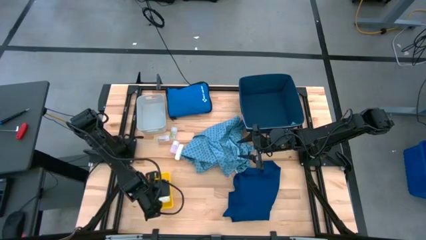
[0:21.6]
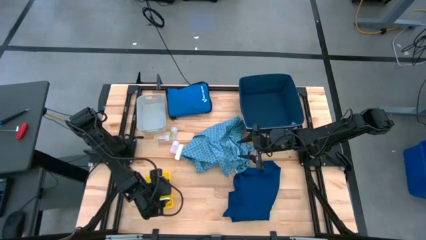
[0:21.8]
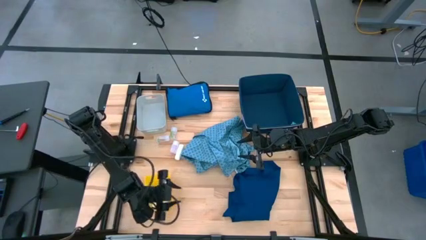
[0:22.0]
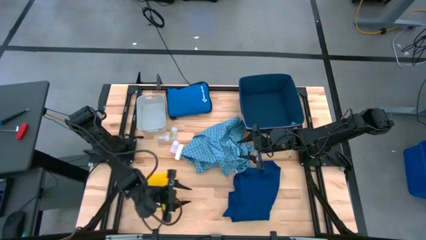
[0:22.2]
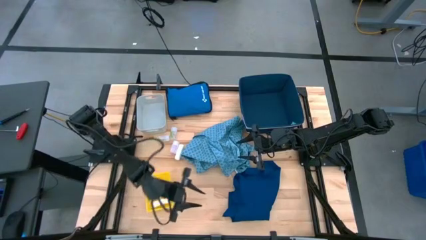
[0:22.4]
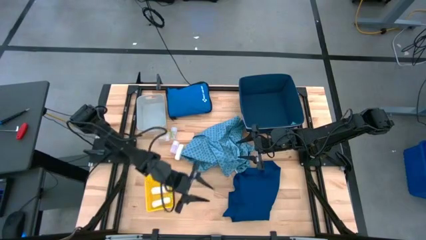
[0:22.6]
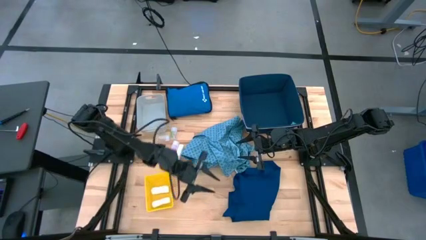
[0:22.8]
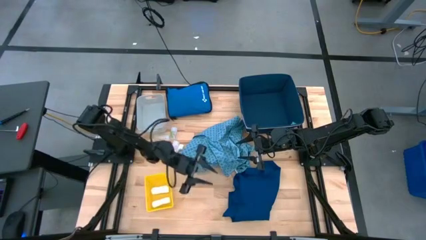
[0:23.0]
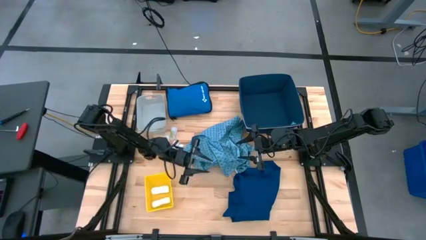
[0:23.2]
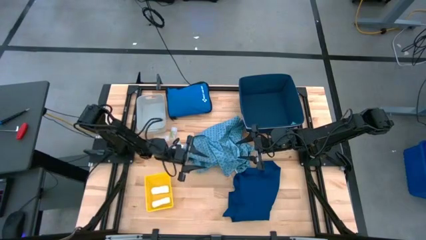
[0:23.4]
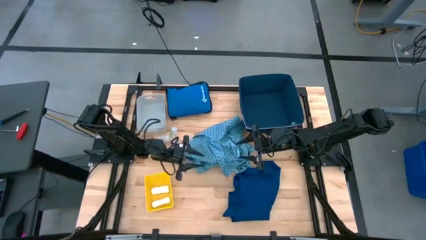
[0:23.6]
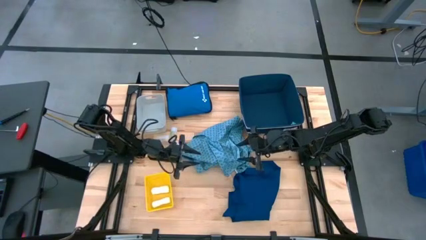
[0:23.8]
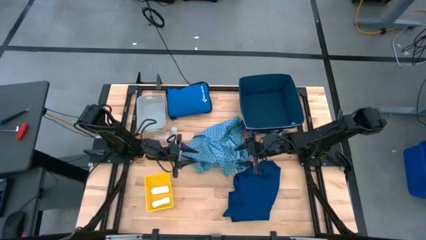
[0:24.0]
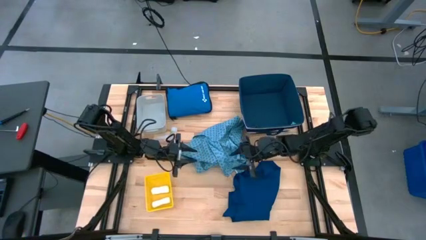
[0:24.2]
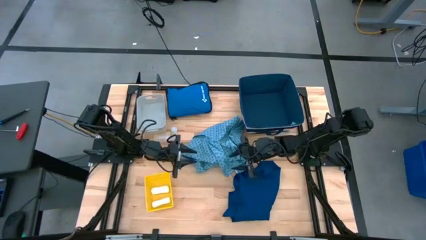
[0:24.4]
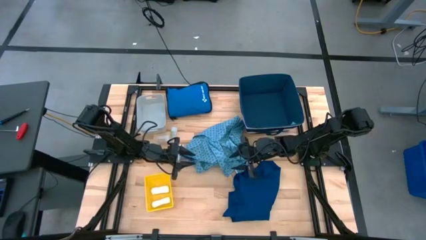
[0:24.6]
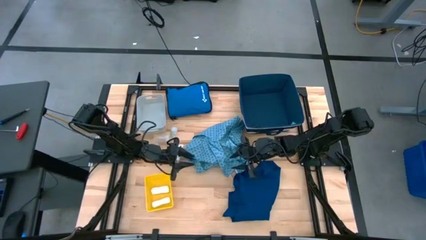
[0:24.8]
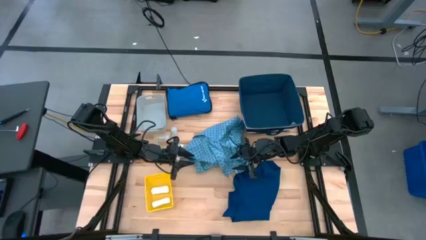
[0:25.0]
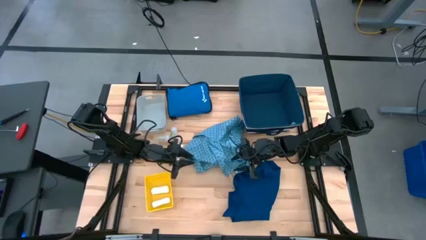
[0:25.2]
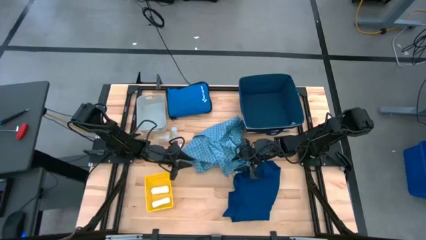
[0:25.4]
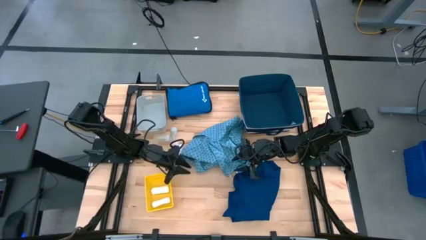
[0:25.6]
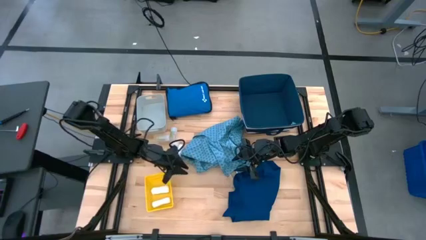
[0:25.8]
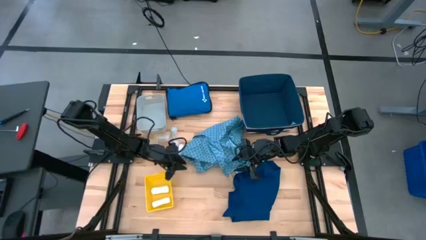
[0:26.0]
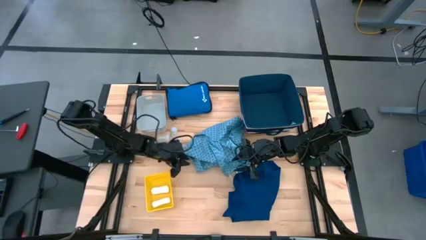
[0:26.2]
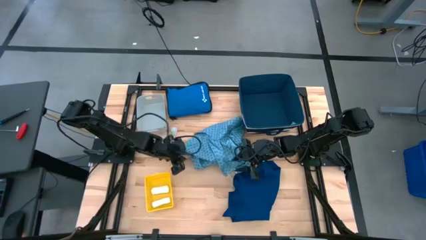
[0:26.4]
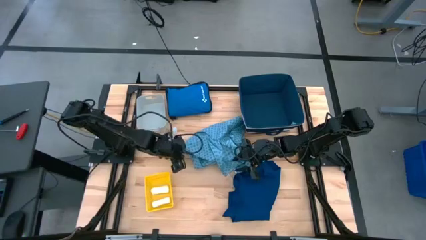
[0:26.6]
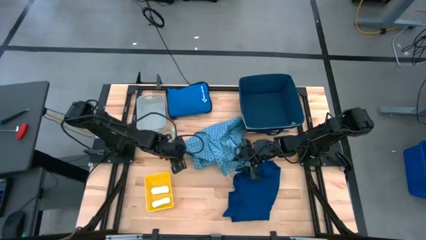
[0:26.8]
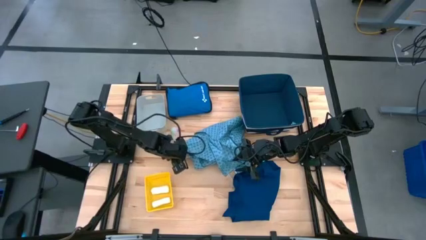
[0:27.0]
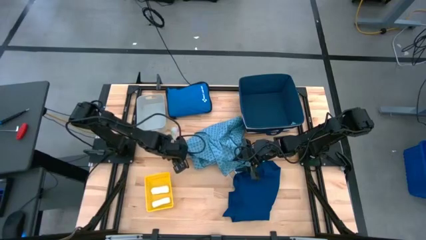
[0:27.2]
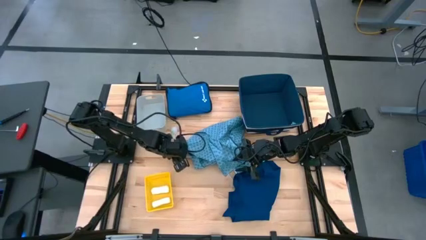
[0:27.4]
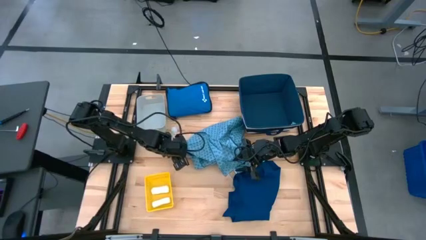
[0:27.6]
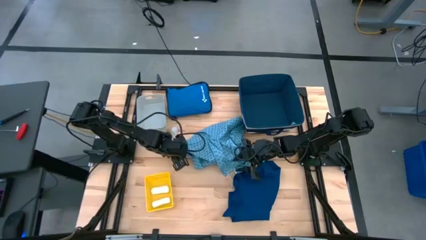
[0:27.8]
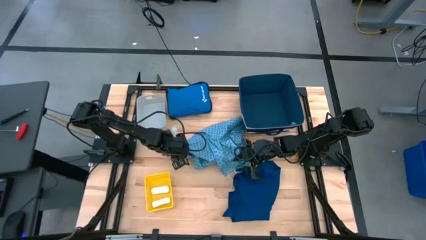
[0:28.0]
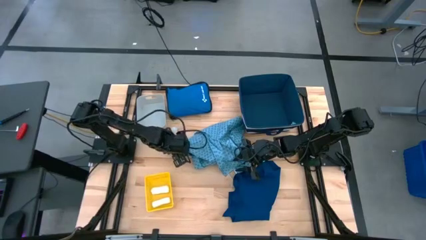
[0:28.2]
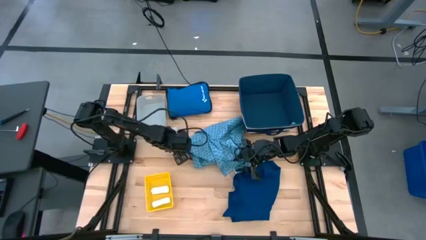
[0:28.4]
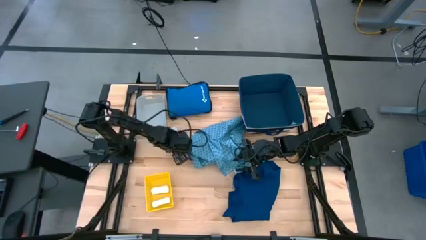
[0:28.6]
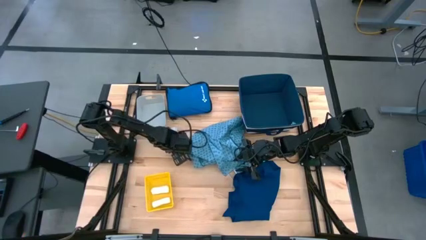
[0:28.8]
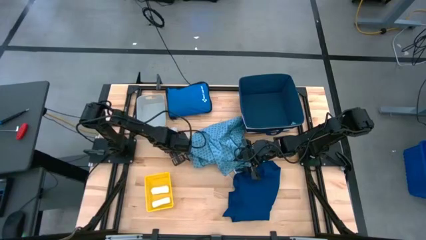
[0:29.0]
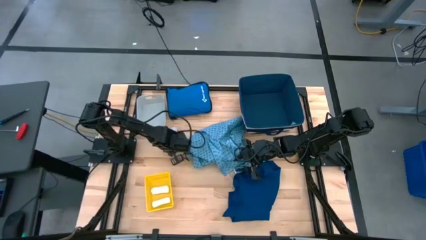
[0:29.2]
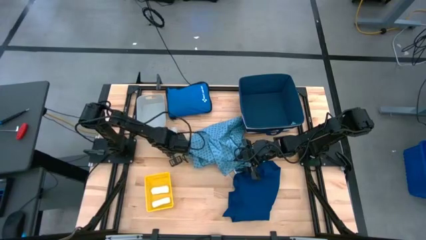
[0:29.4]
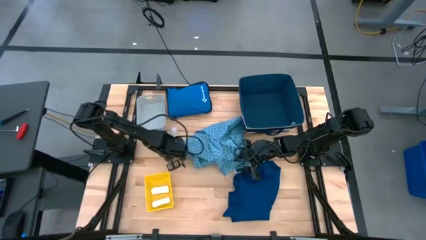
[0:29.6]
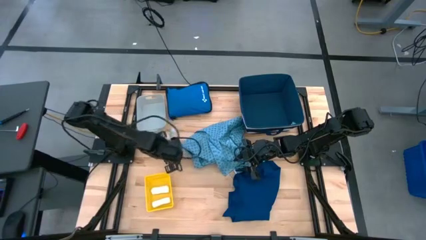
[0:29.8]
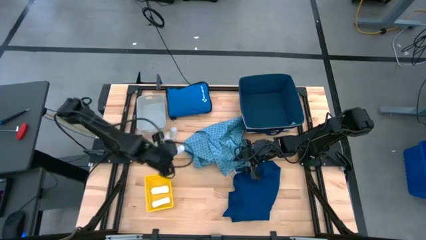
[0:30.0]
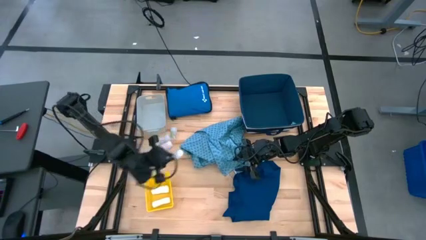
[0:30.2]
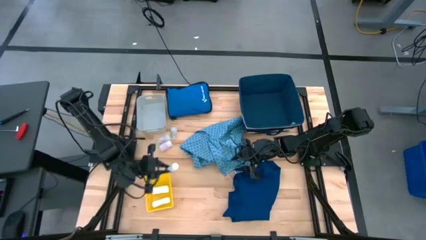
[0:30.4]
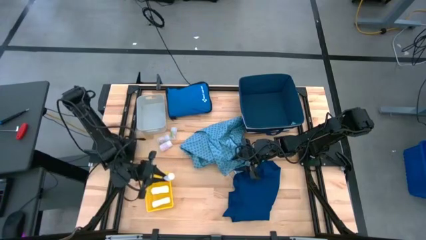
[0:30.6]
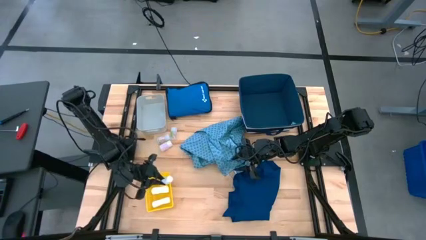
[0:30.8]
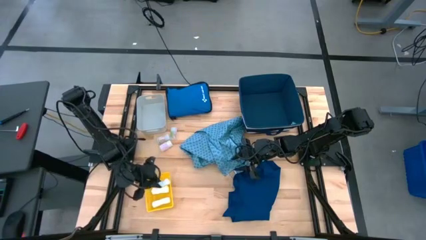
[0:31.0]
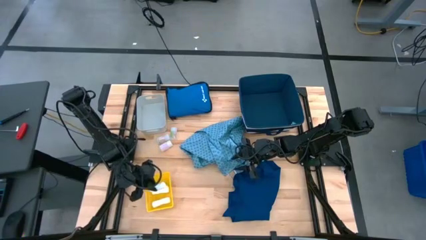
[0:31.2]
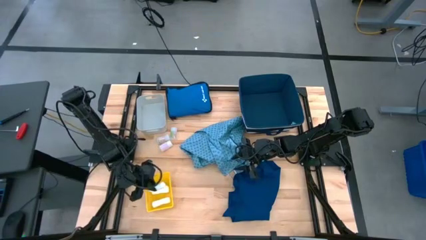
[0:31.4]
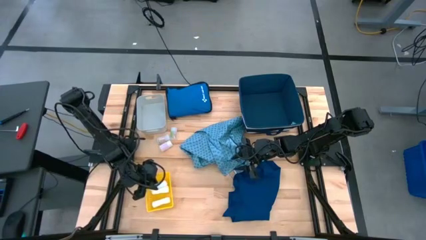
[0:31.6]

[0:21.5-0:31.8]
Task: Pick & place medical supplies in basket/bin
Put the white bandage into the yellow basket

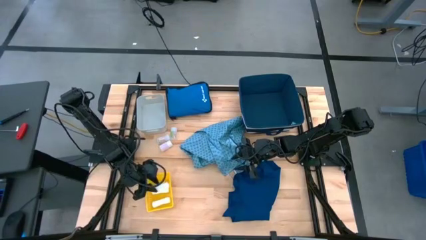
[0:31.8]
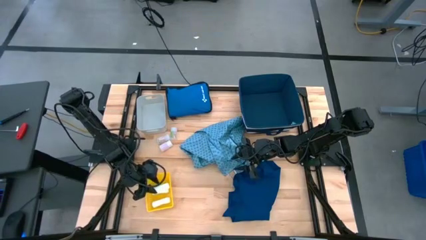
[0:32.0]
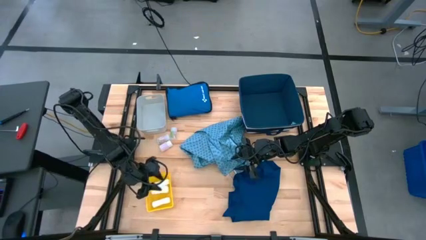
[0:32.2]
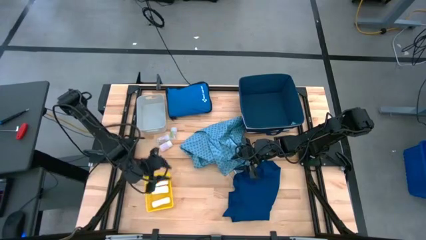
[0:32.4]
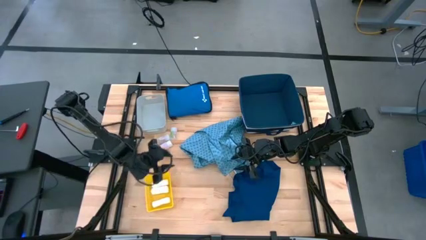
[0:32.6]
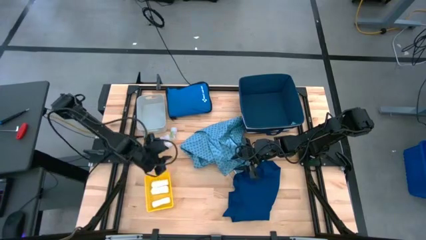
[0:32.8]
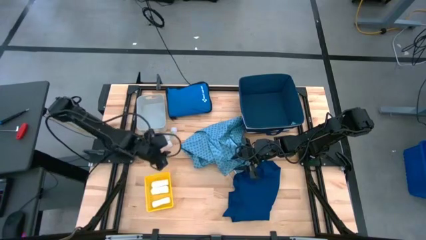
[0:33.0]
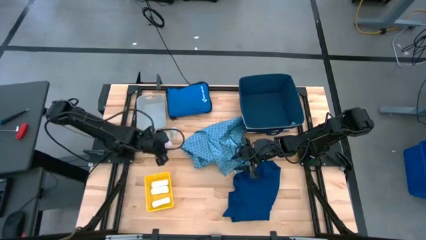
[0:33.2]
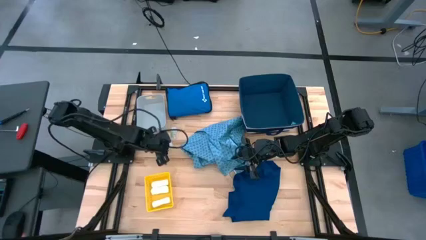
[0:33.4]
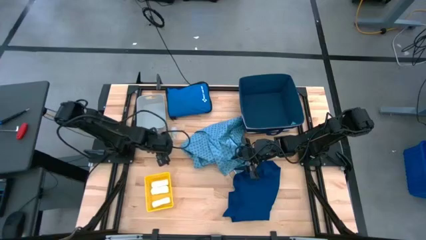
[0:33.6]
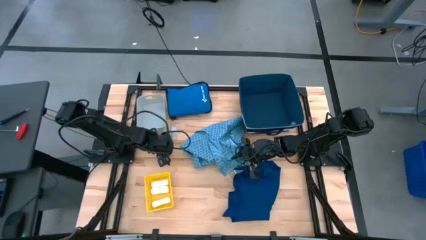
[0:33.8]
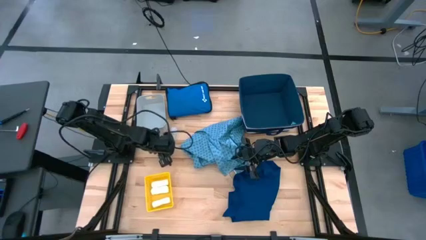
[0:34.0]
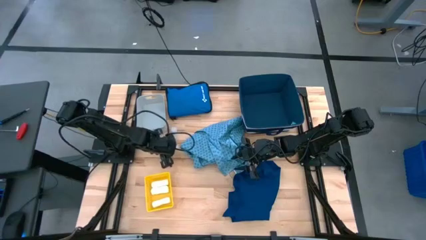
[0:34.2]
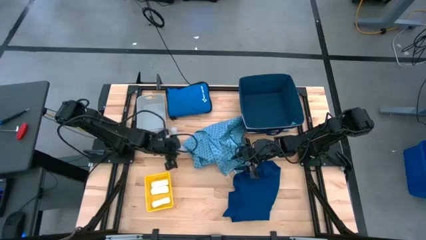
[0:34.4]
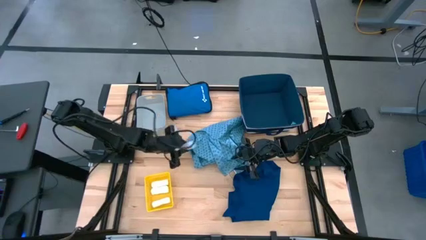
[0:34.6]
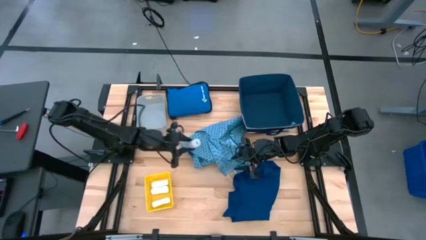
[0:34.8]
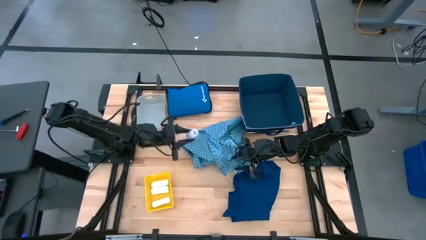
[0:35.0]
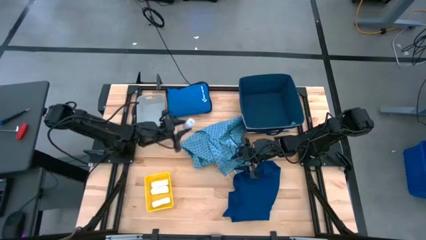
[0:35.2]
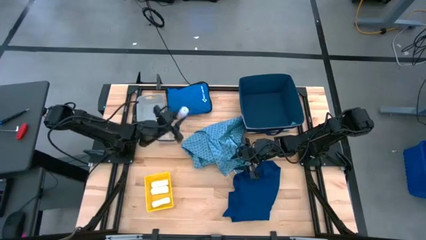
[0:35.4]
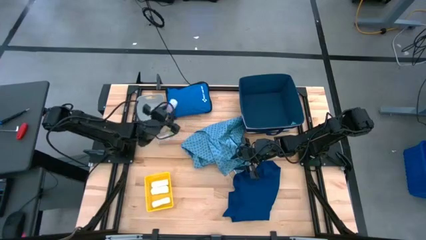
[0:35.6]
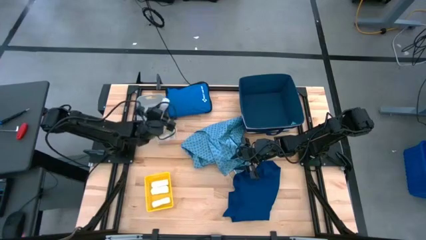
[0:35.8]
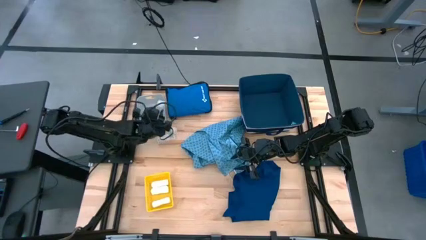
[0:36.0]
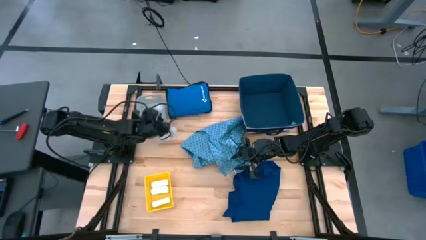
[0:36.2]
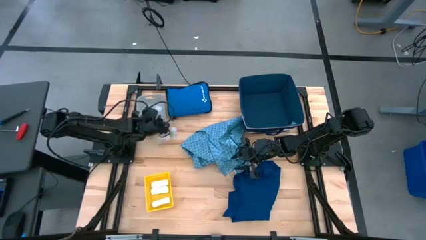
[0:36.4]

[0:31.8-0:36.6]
Put the white pill bottle into the gray bin

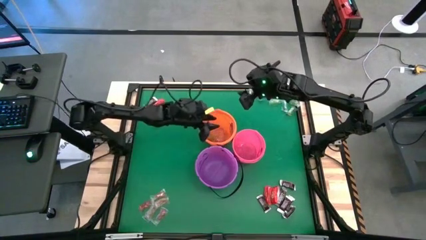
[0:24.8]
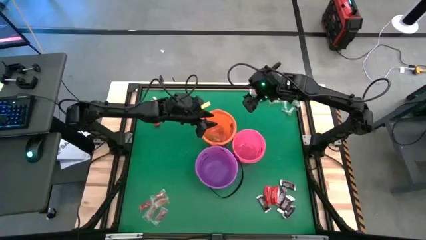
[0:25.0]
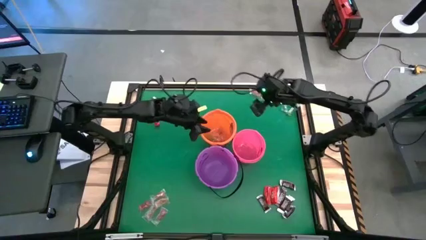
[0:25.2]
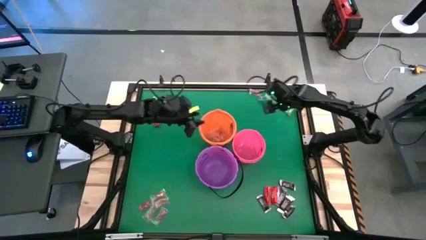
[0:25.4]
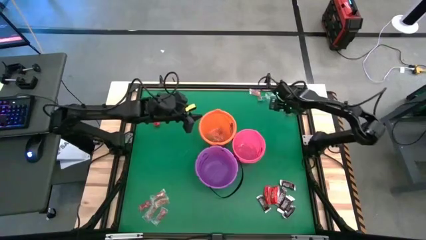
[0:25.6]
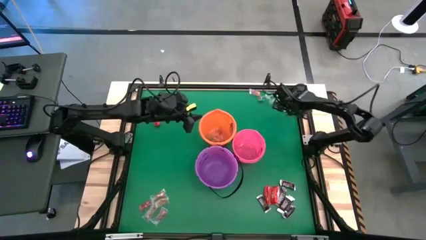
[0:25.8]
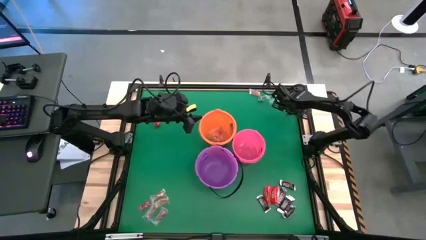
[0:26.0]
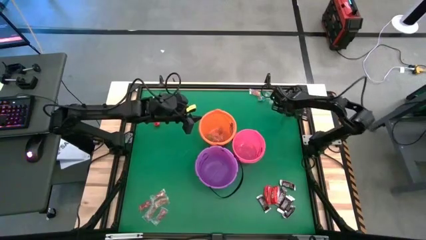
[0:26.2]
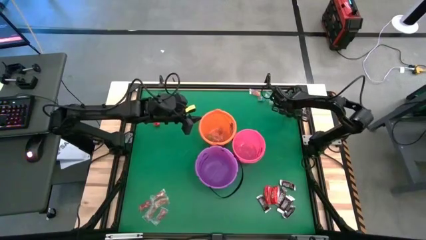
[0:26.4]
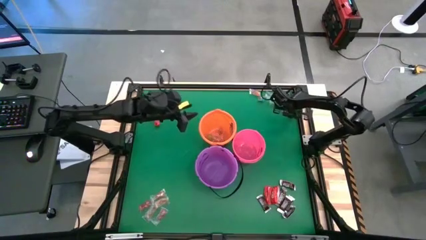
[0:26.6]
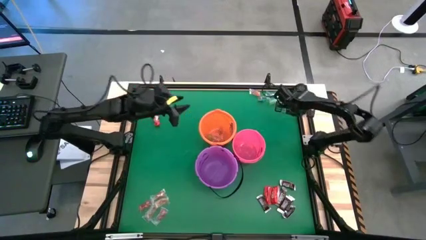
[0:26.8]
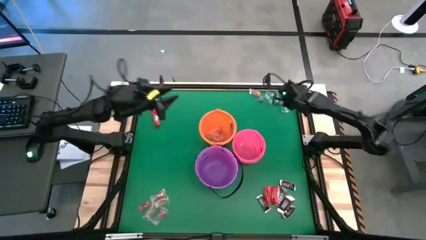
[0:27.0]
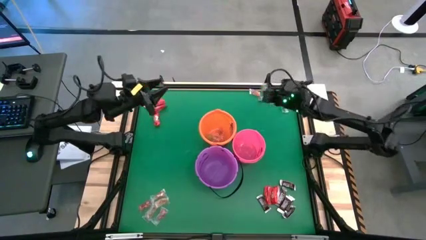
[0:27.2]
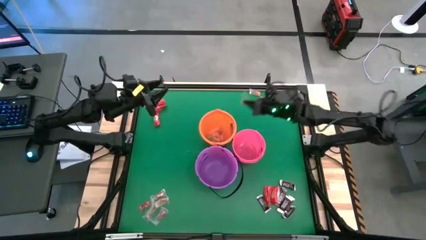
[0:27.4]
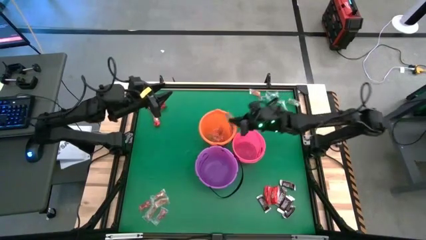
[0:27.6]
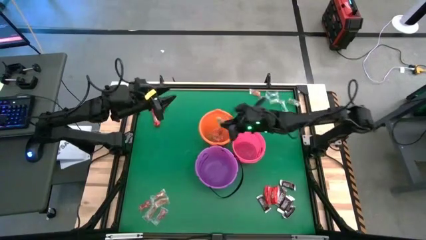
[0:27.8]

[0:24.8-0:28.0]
Task: Sort candy by brand, put in halloween buckets
Put the green gummy into the orange bucket
